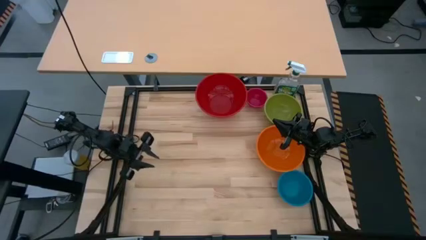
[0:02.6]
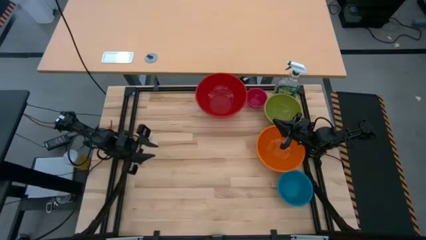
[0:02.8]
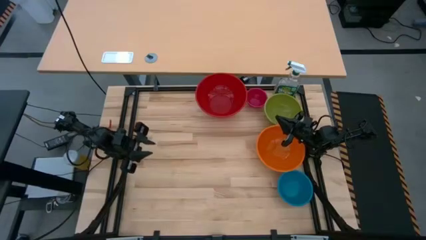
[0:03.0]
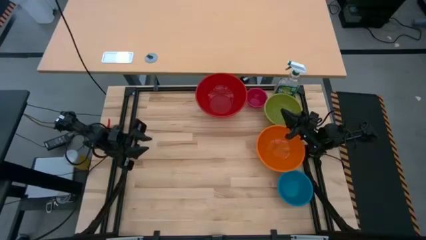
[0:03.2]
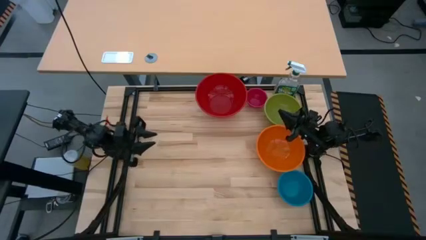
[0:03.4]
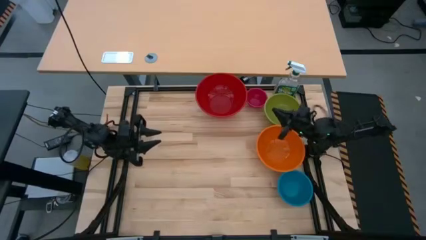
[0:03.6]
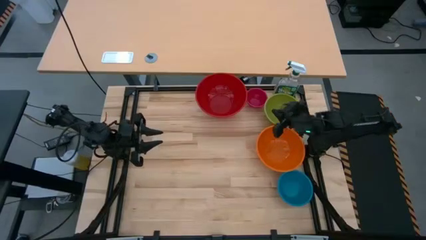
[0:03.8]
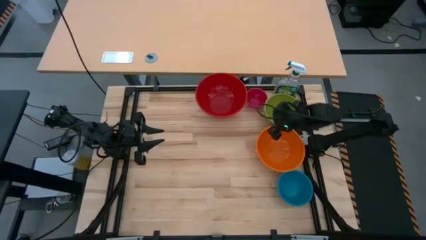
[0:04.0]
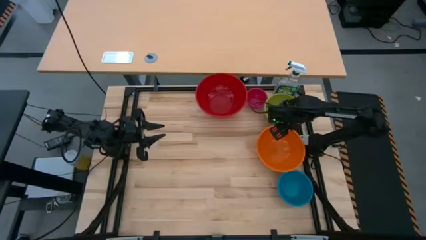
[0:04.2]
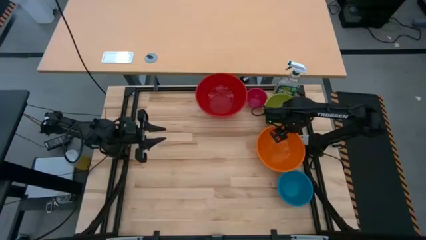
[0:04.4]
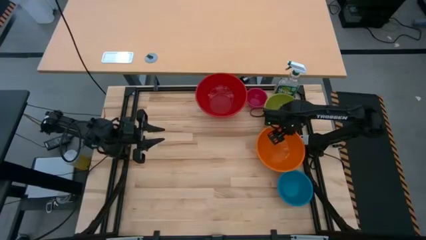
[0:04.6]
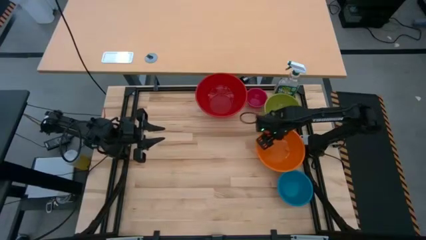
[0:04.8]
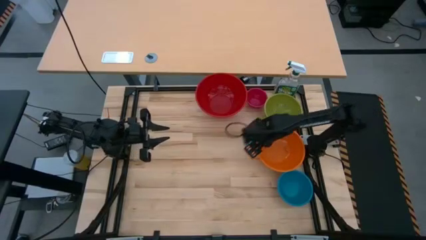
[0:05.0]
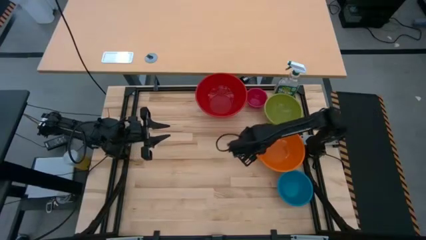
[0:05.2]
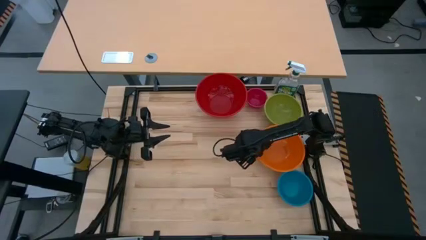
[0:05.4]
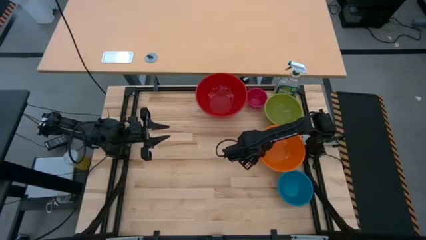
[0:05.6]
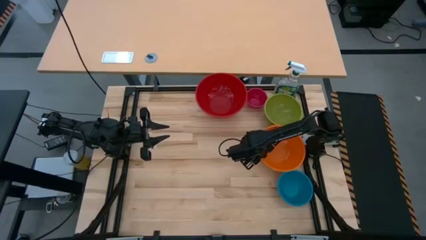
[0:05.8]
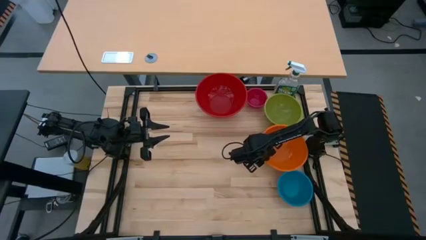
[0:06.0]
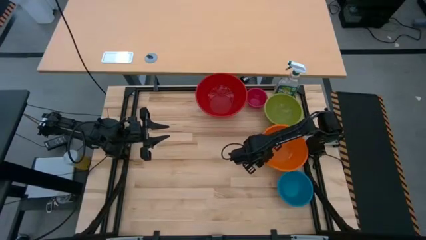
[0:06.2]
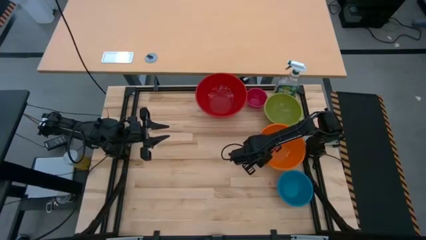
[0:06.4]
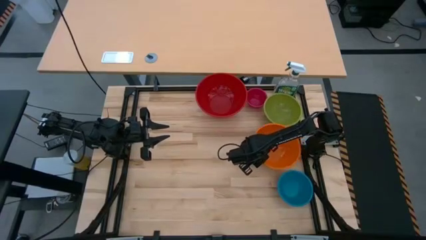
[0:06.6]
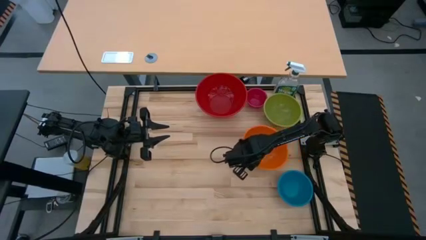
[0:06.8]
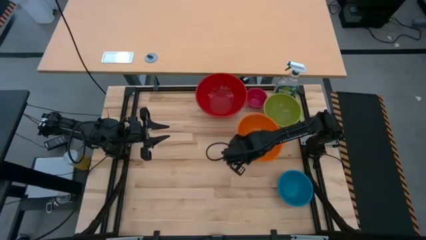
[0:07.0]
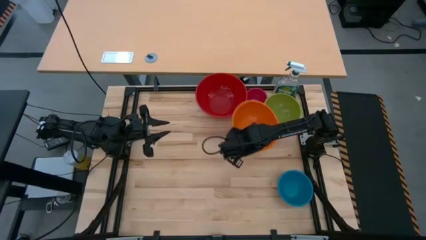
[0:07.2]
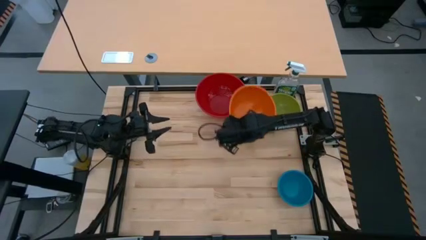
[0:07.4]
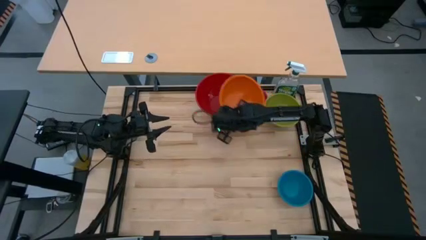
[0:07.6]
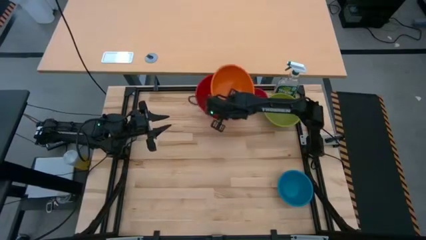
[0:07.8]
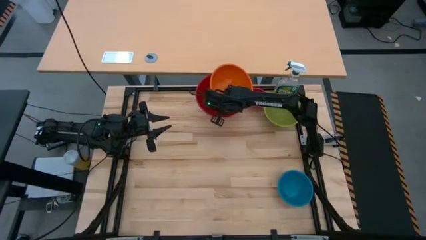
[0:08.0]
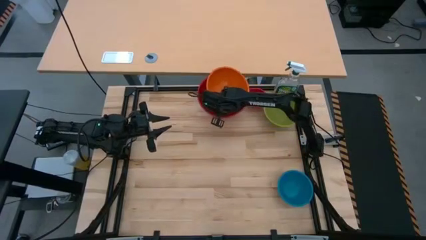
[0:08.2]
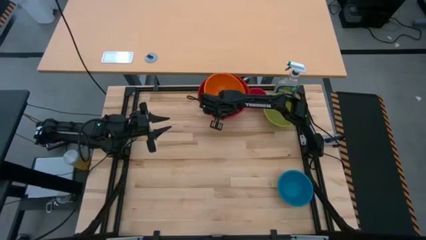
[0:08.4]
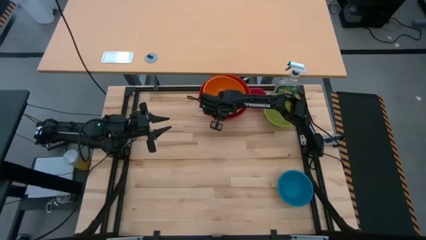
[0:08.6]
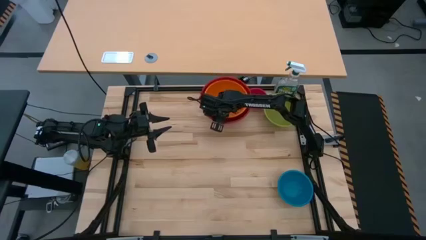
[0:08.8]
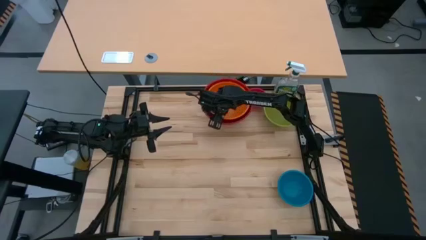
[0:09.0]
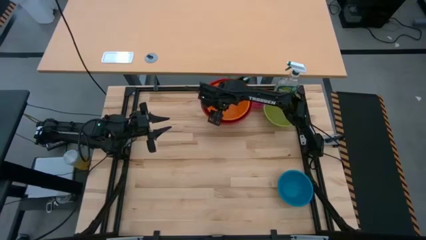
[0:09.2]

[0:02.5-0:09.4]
Stack the big orange bowl on top of the big red bowl

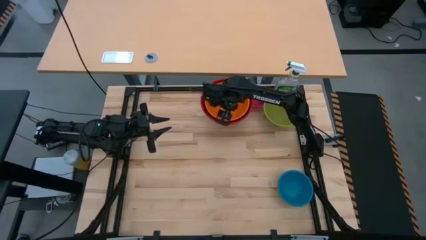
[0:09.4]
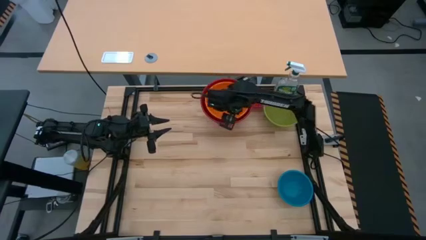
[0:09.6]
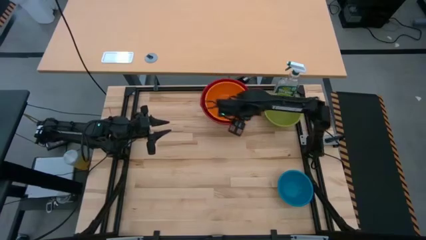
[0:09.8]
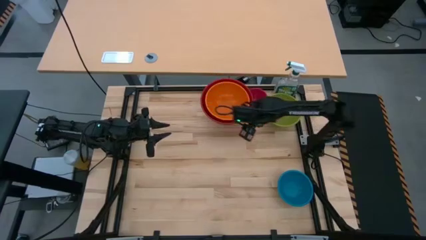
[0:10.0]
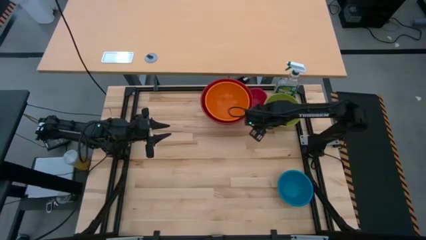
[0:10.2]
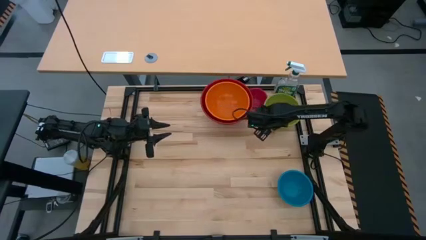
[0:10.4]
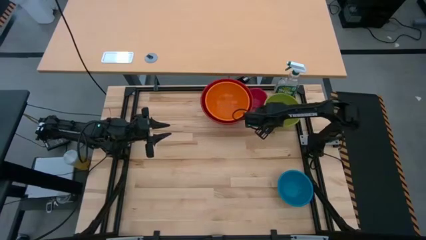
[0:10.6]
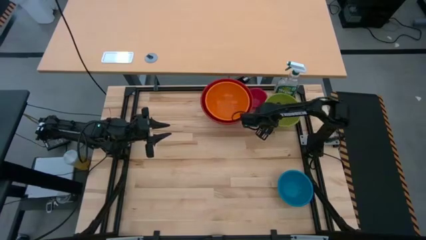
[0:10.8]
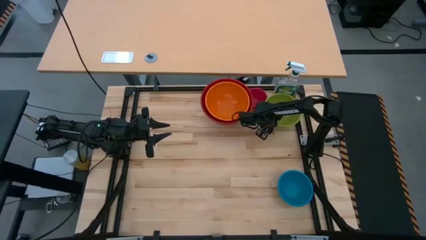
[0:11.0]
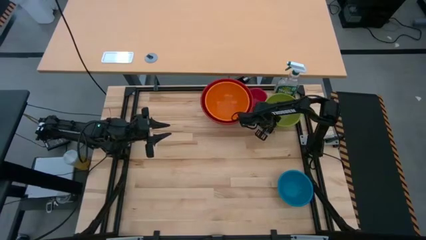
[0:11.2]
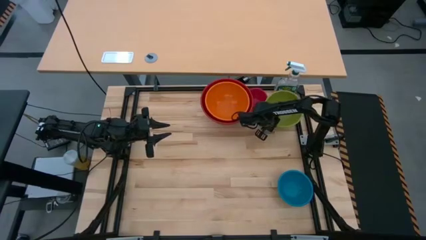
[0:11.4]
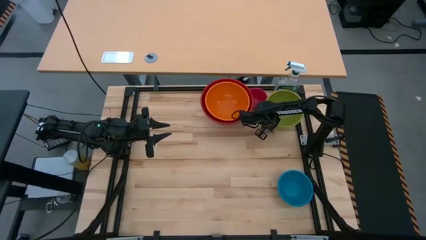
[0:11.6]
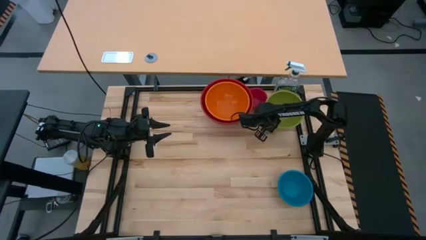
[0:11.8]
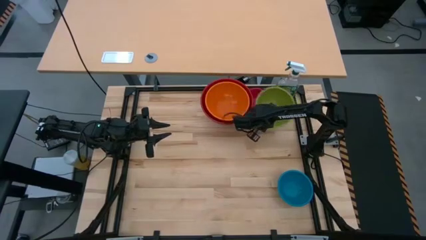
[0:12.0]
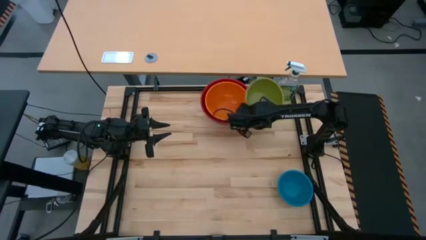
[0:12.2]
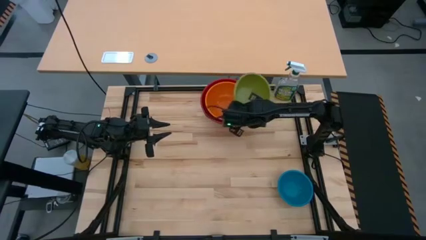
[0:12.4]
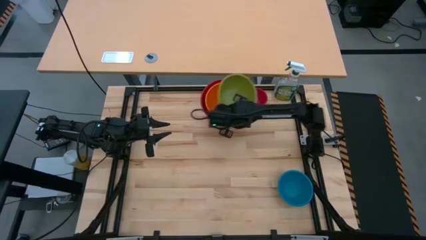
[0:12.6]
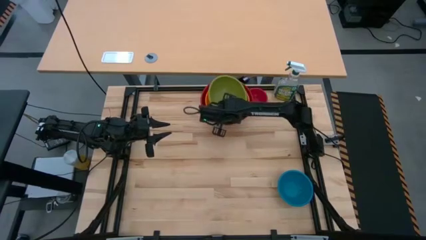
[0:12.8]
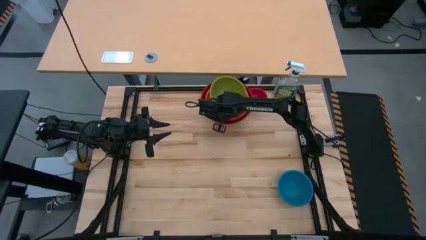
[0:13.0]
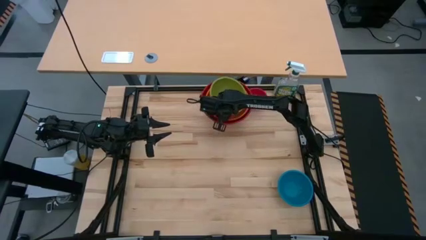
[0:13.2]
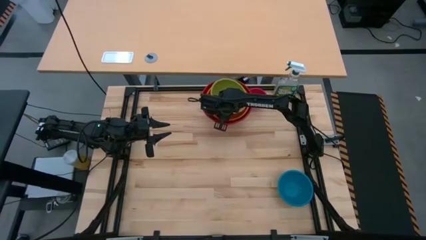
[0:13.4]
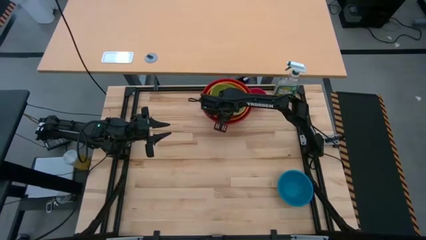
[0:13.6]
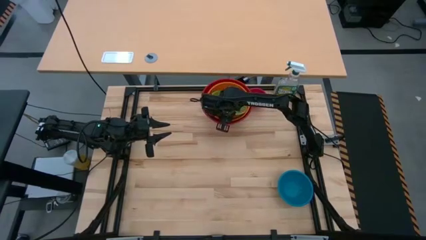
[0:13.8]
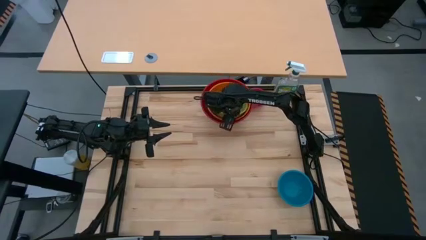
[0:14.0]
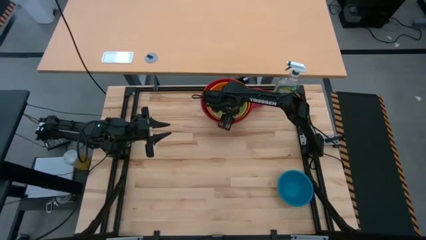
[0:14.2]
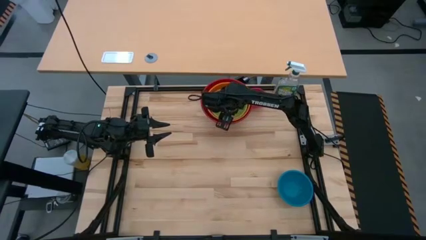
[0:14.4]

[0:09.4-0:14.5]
Stack the small green bowl on top of the big orange bowl

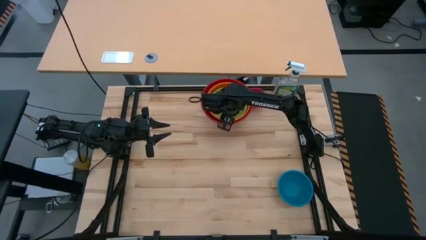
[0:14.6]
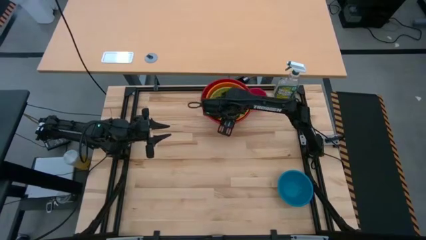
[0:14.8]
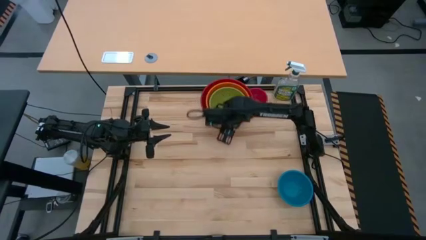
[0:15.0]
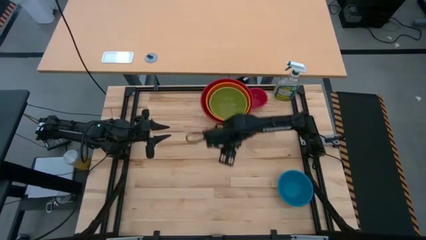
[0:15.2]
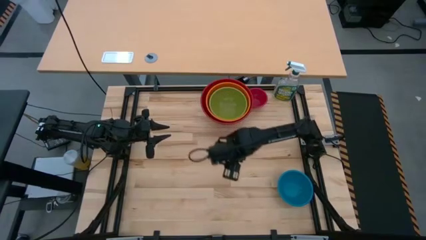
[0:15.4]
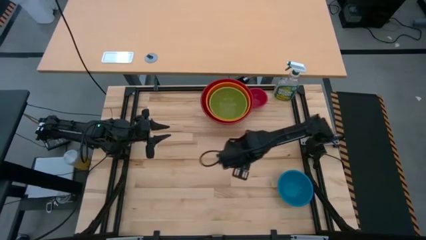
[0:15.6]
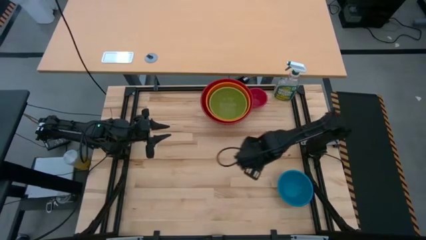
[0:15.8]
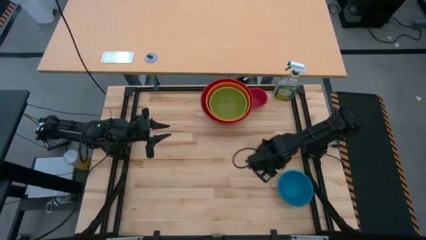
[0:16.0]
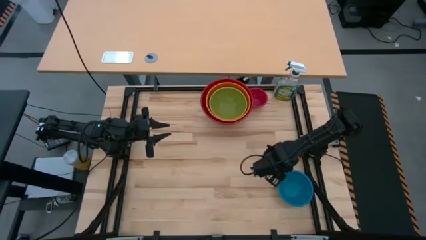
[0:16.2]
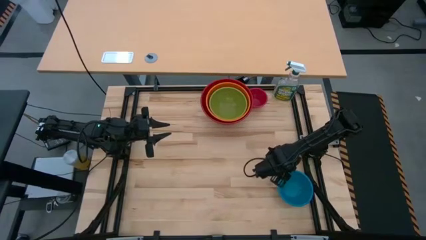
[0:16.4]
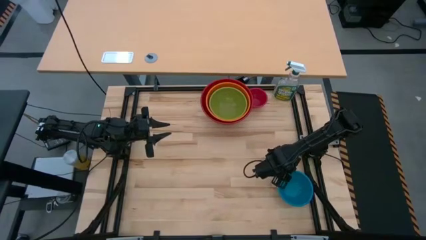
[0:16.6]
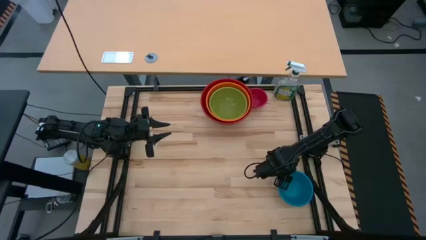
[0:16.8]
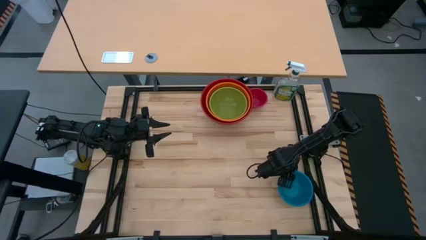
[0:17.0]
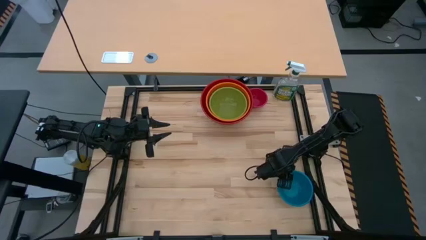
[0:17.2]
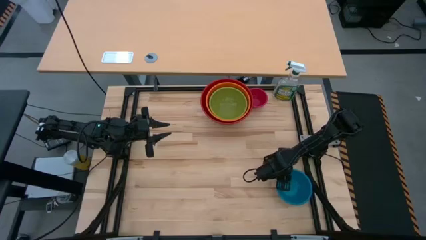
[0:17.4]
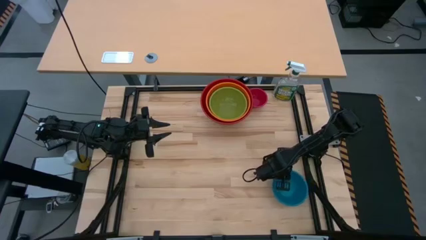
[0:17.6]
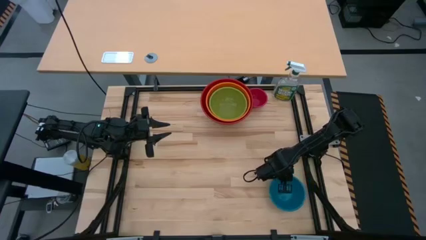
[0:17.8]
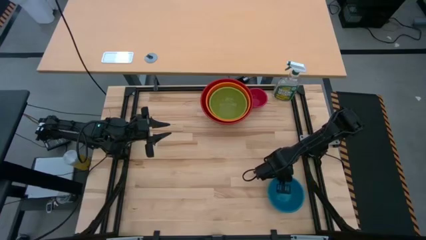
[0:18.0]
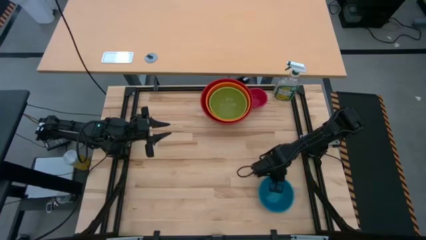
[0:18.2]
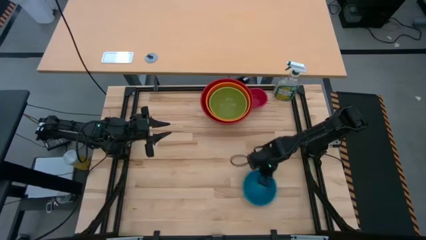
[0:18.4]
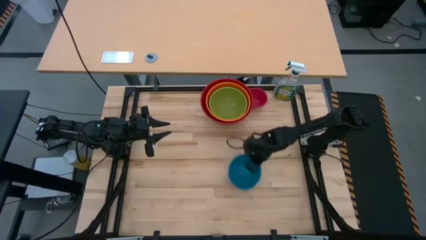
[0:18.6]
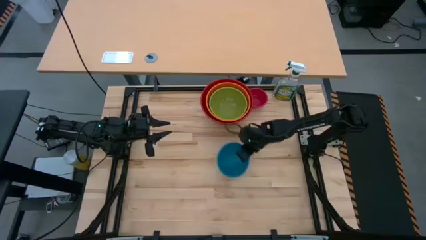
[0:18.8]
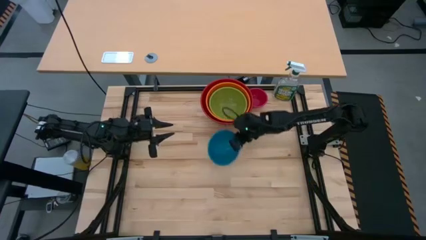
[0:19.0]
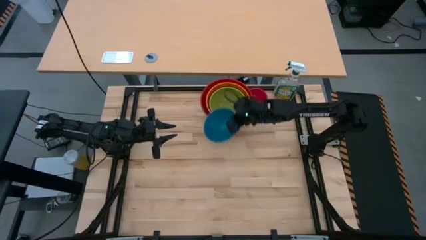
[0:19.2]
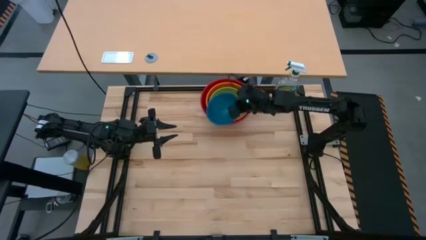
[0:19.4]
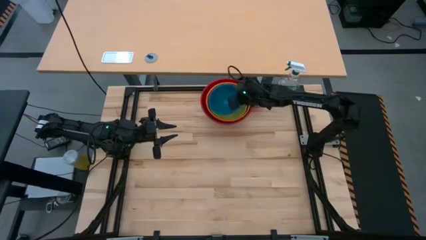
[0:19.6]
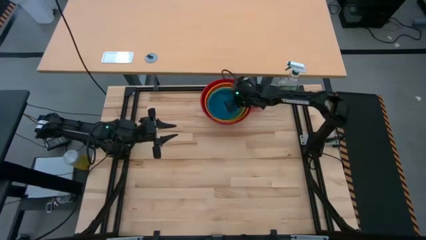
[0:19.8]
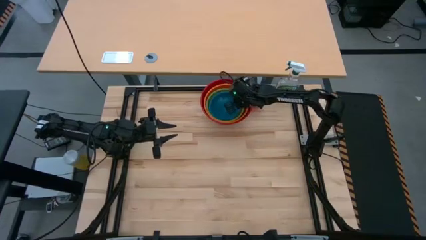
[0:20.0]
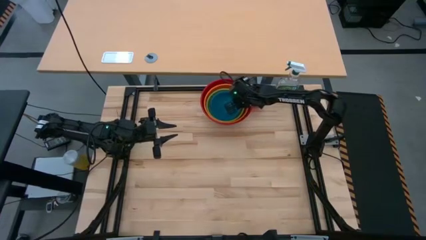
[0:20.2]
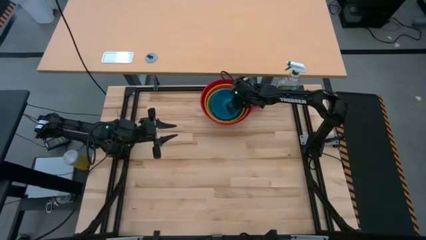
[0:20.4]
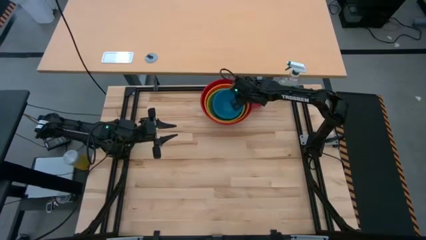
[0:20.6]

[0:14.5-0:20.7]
Stack the small blue bowl on top of the small green bowl
